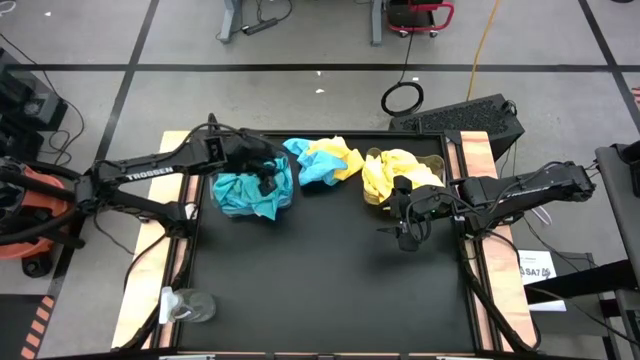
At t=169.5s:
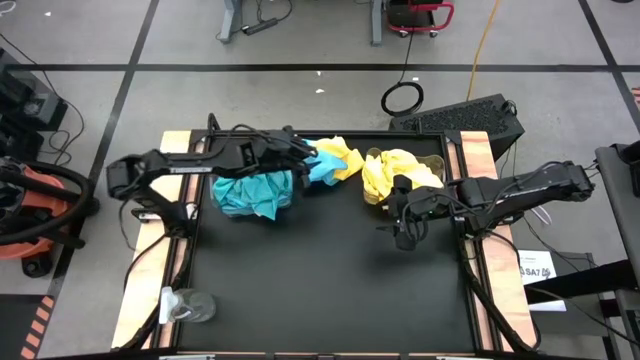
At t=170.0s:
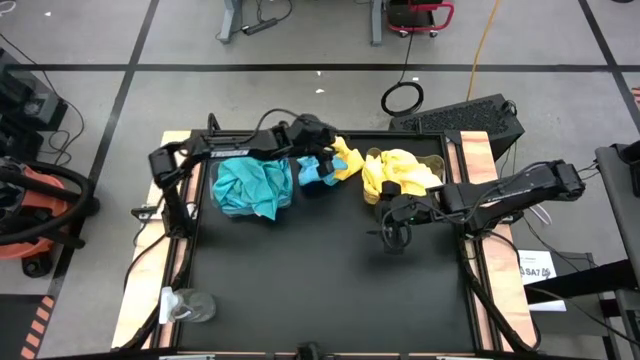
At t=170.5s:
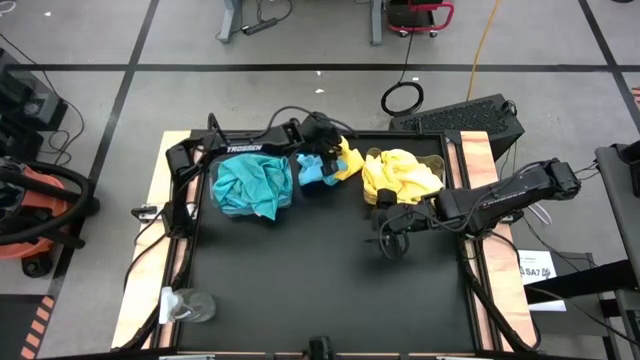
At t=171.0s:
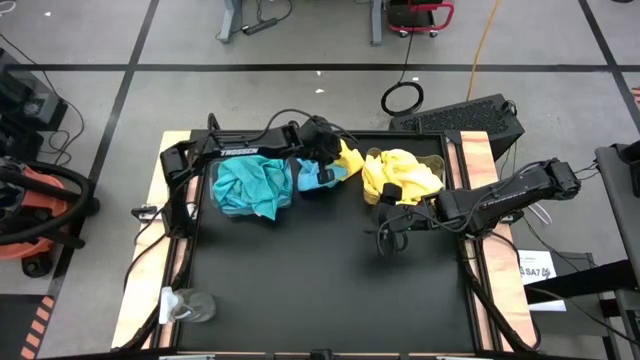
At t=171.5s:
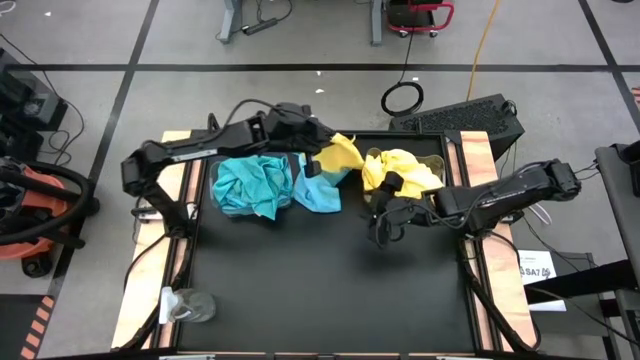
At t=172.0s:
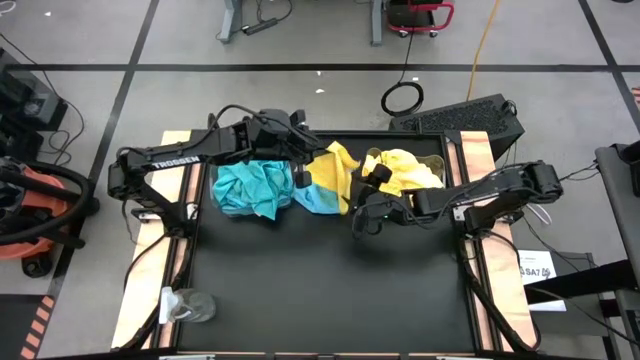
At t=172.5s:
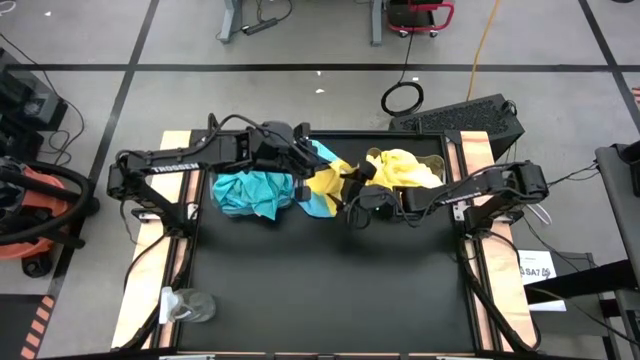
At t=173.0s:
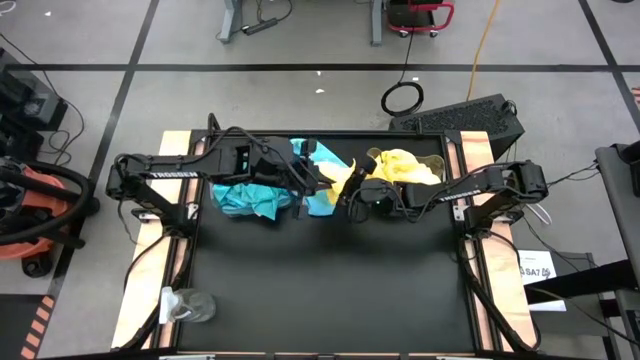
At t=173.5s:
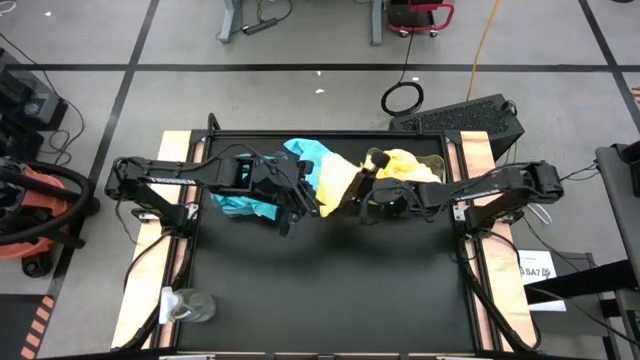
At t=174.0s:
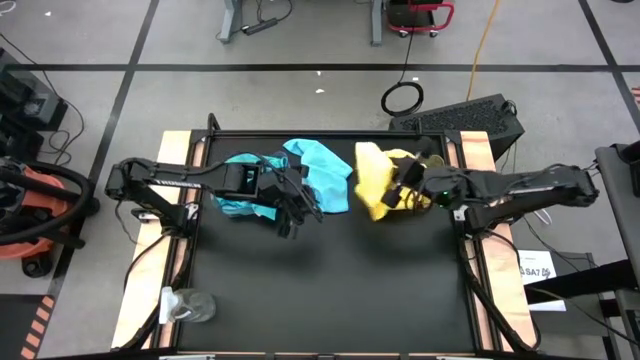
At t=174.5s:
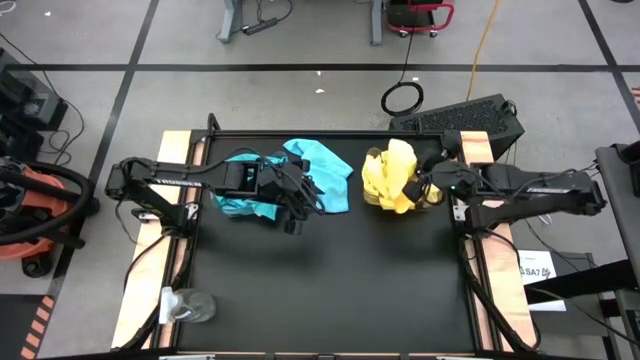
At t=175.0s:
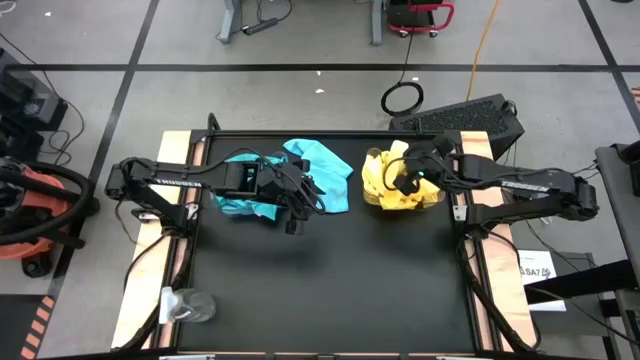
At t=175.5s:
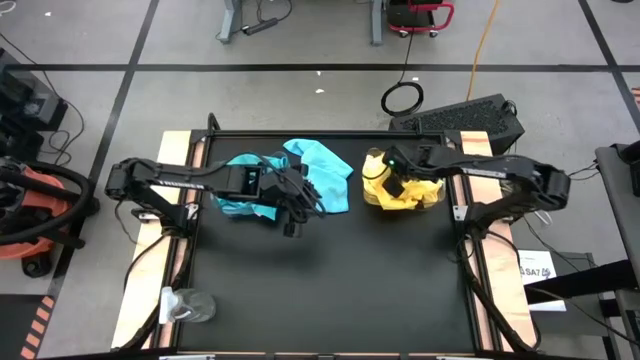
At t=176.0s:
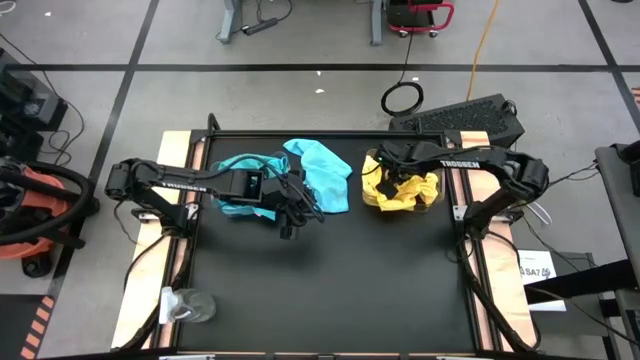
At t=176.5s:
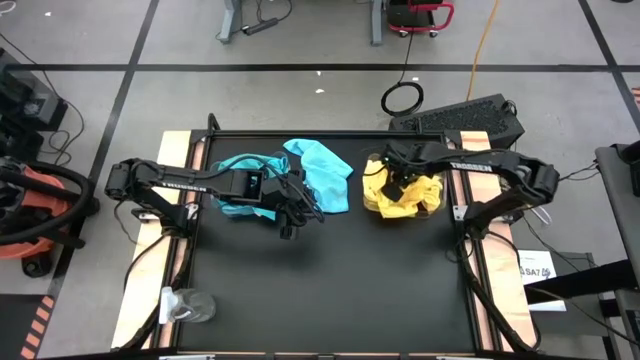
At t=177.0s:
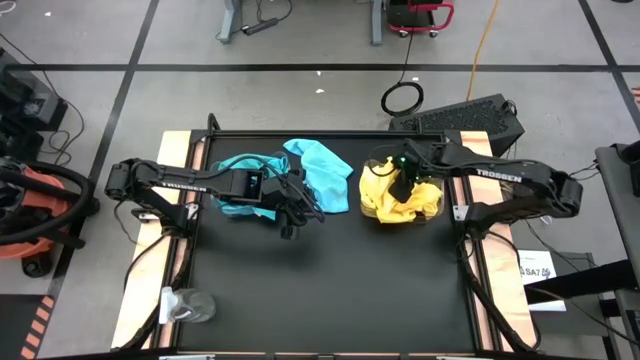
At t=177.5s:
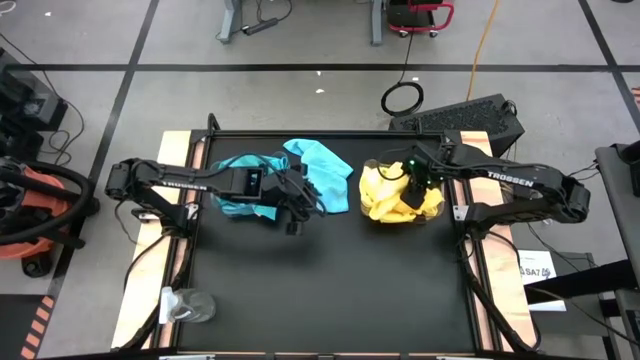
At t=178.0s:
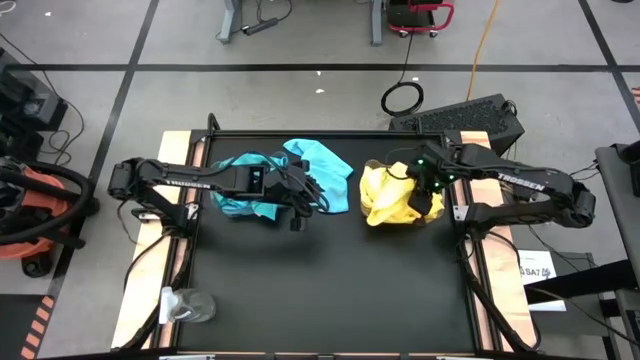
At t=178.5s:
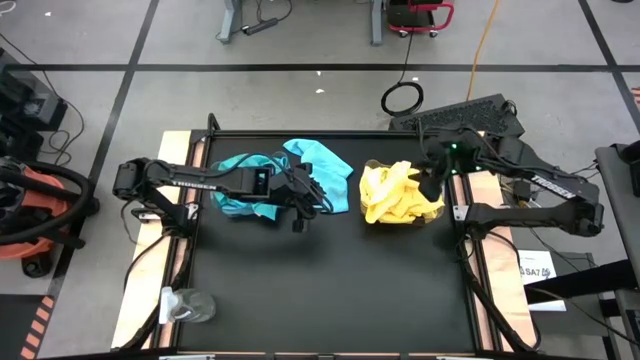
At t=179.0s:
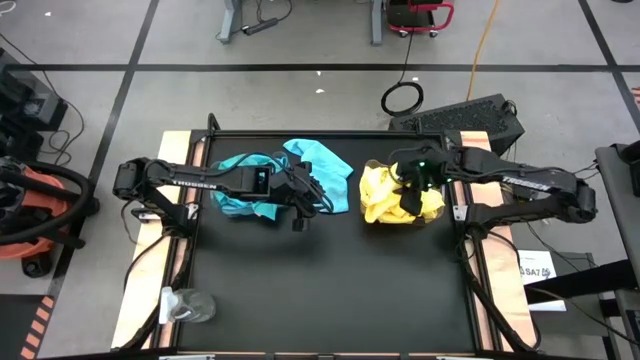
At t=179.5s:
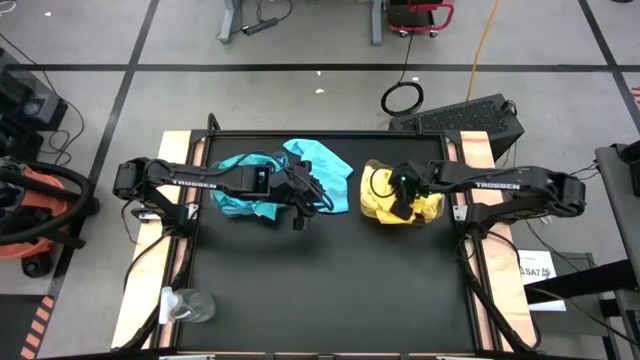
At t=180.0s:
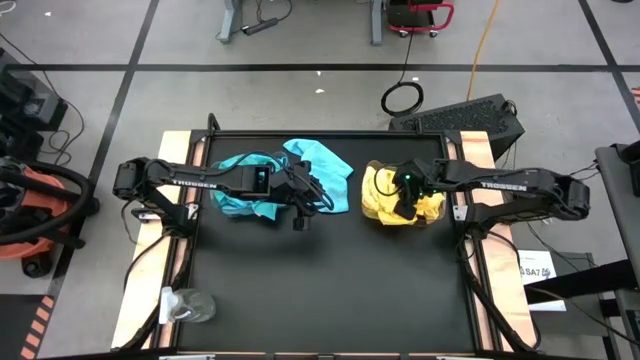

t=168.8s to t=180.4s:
Task: Sort microfiber towel by color & place in baskets
Put the yellow microfiber cloth into the right transparent bin

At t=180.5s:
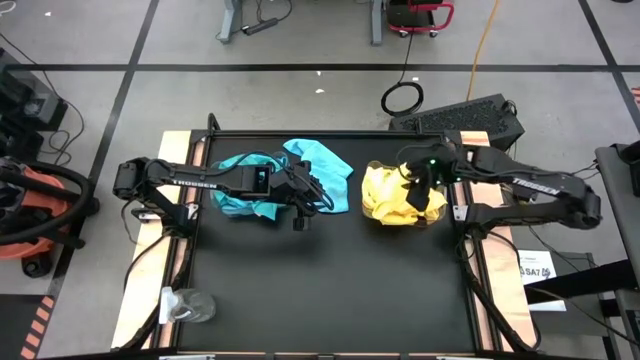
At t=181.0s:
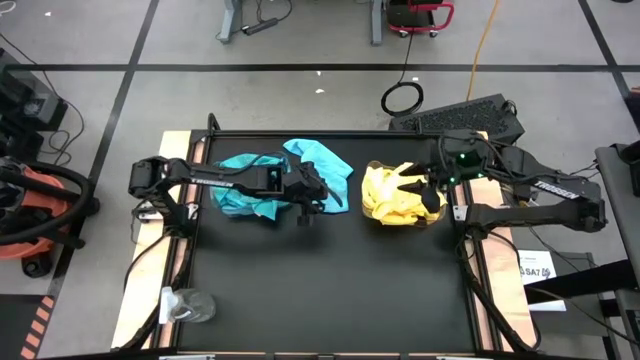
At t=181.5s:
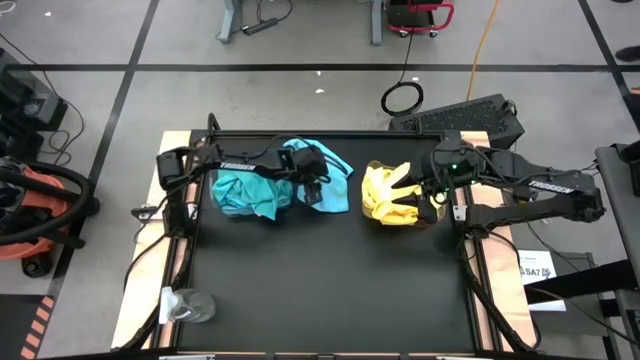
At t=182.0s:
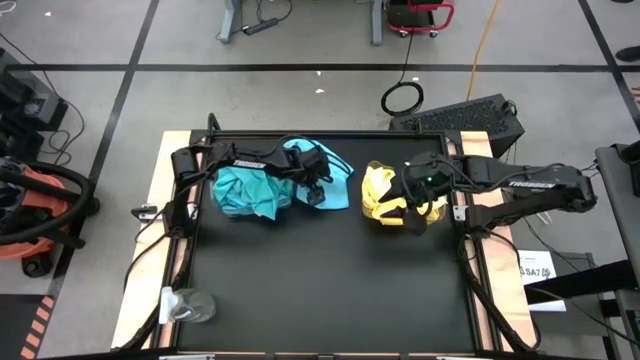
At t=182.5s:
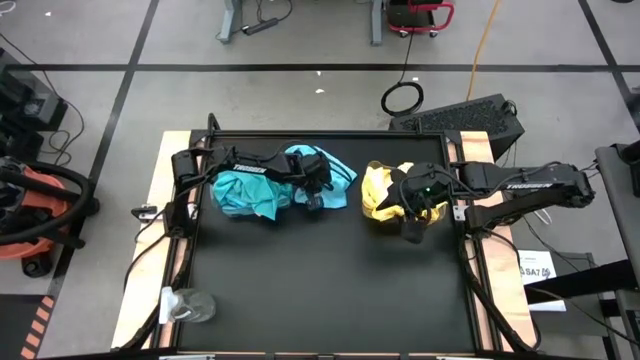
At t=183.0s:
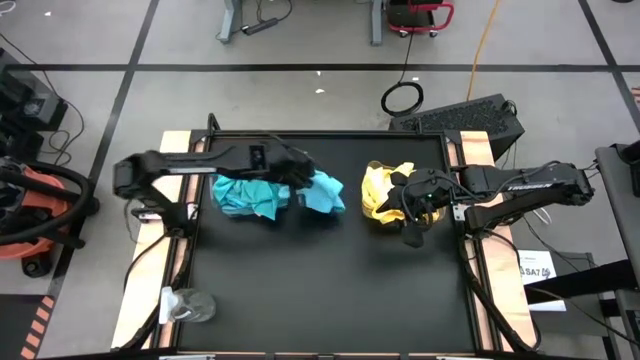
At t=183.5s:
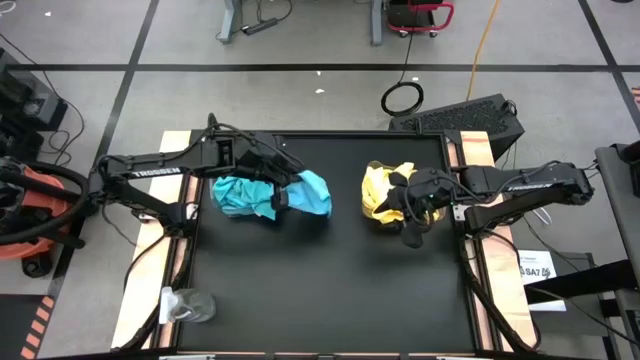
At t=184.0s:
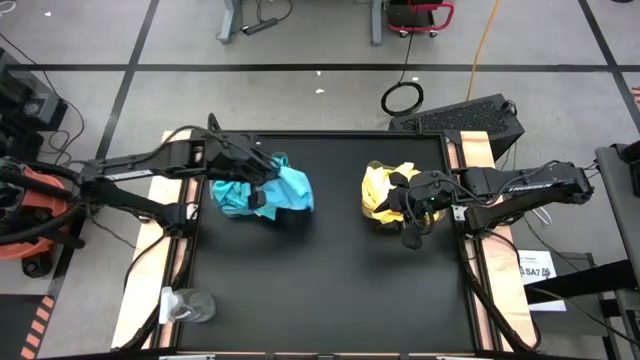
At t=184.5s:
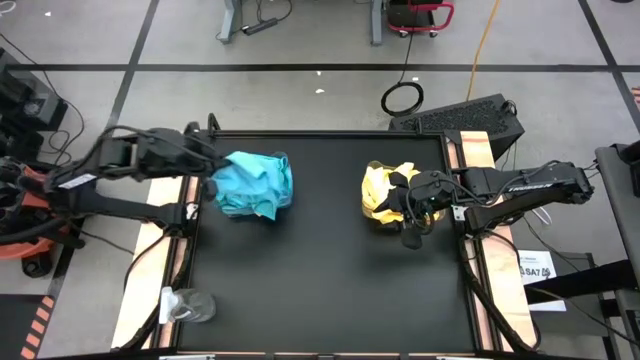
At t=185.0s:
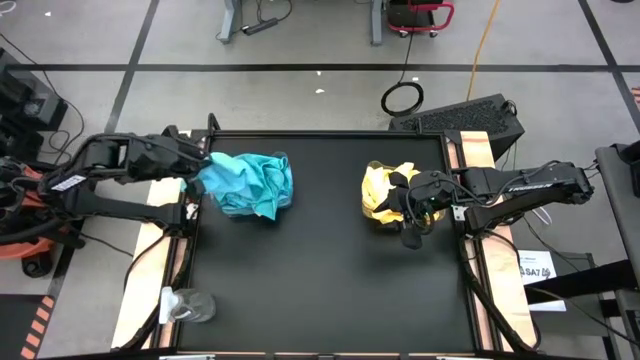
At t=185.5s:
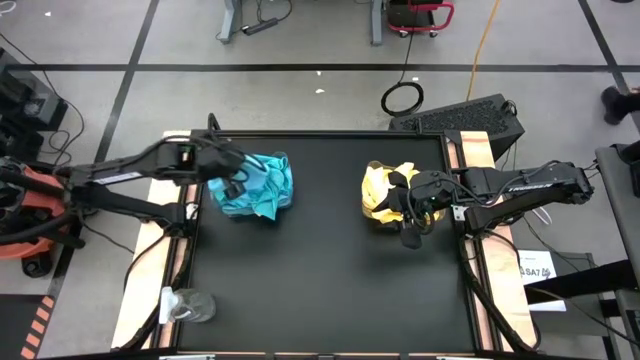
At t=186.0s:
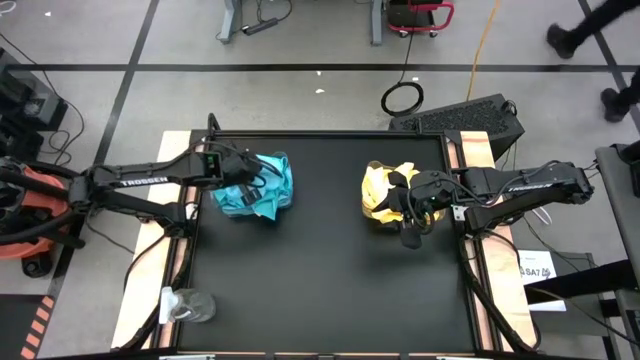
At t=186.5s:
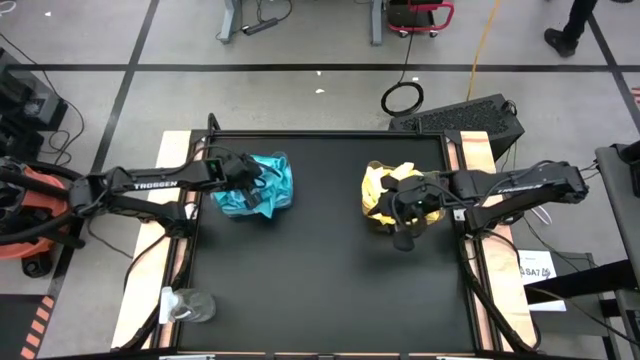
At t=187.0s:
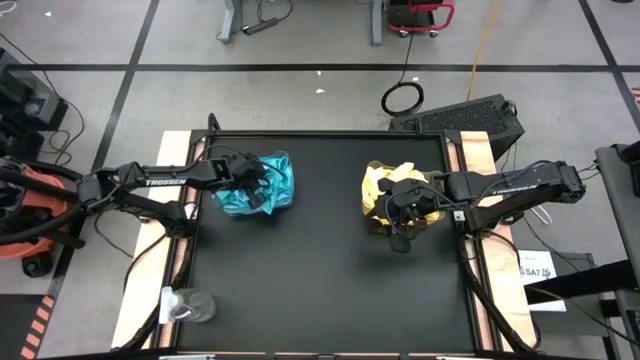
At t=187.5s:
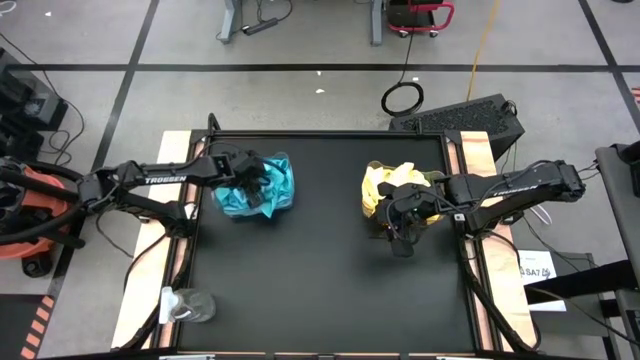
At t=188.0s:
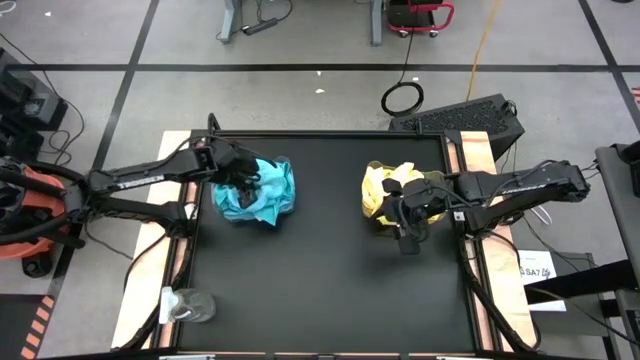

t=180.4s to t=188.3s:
Put the blue microfiber cloth into the left transparent bin
